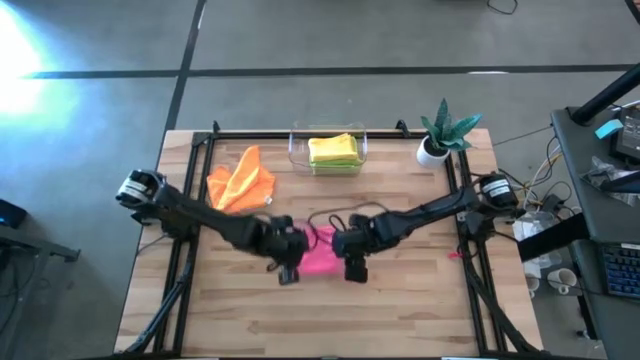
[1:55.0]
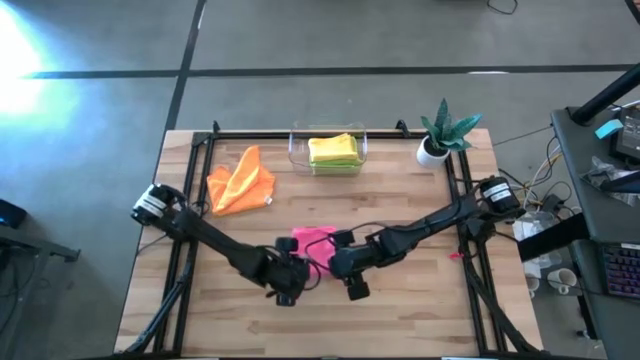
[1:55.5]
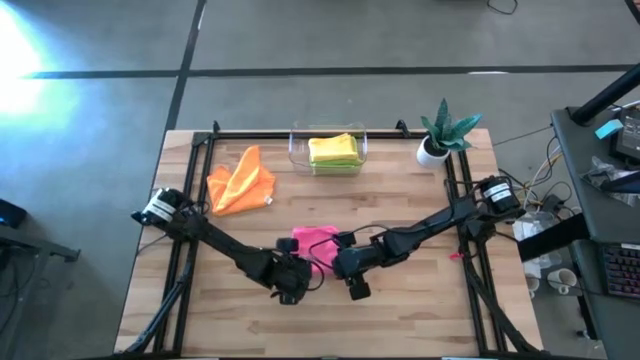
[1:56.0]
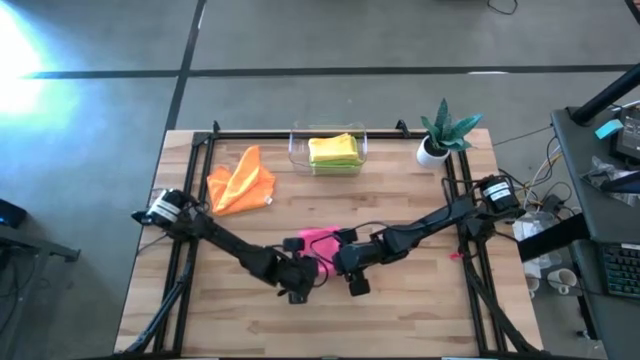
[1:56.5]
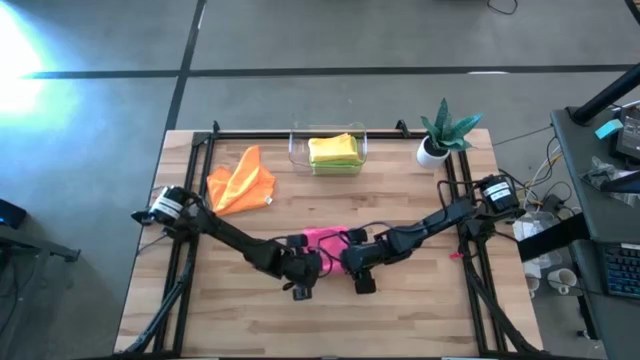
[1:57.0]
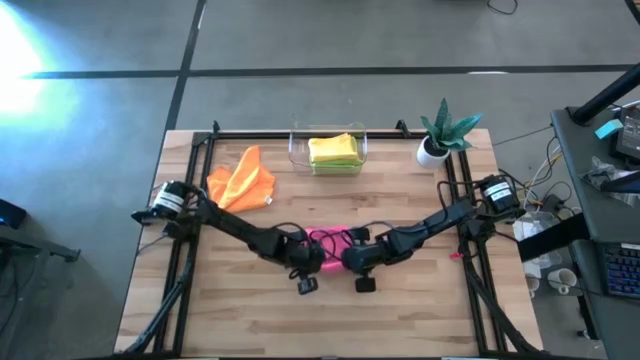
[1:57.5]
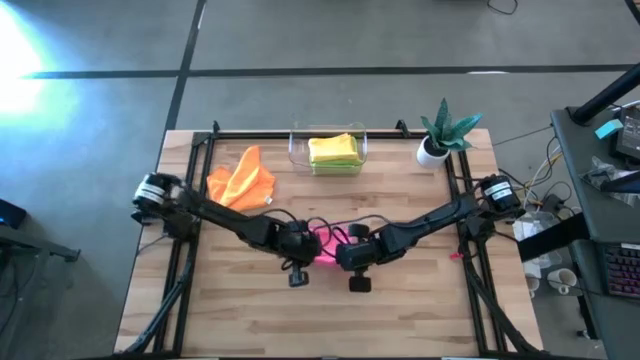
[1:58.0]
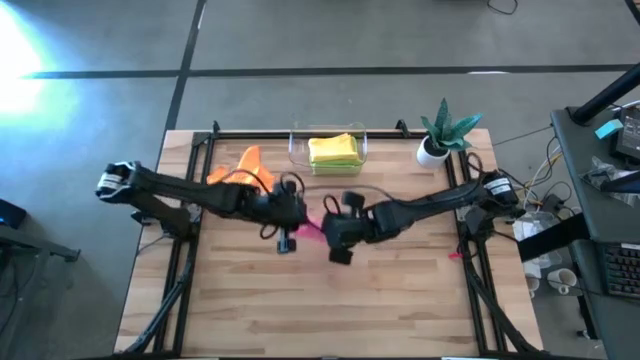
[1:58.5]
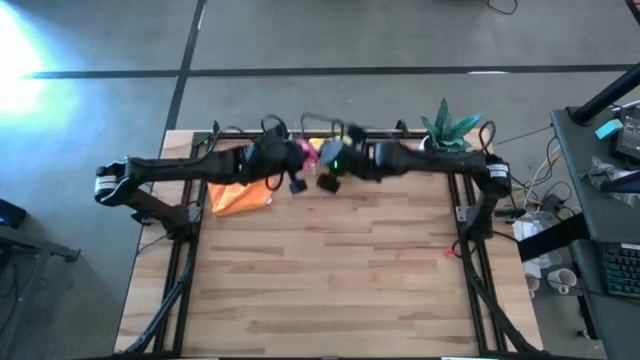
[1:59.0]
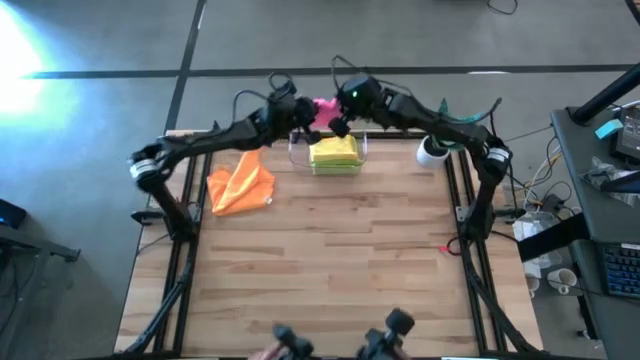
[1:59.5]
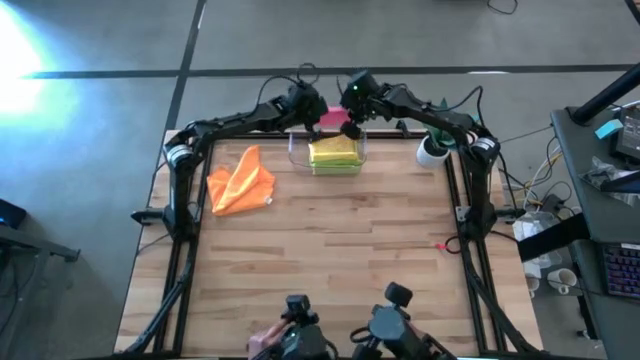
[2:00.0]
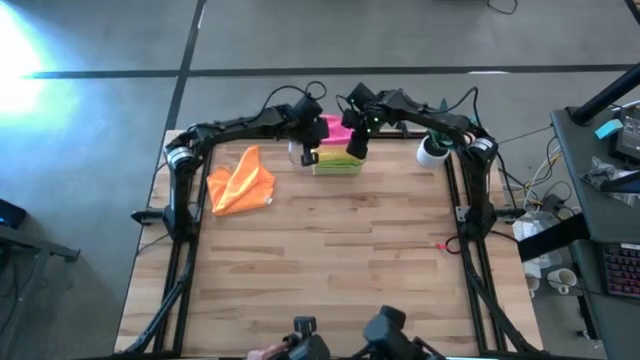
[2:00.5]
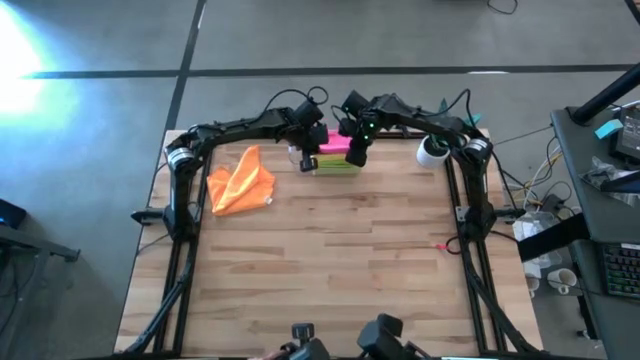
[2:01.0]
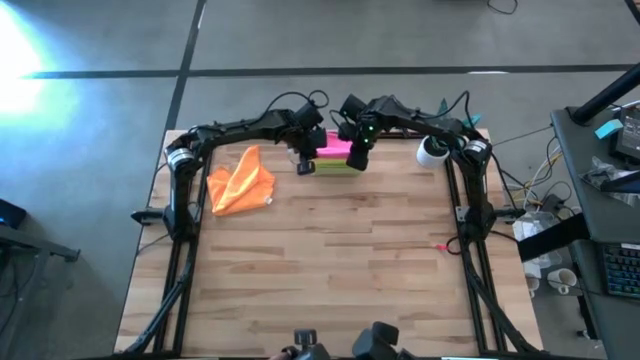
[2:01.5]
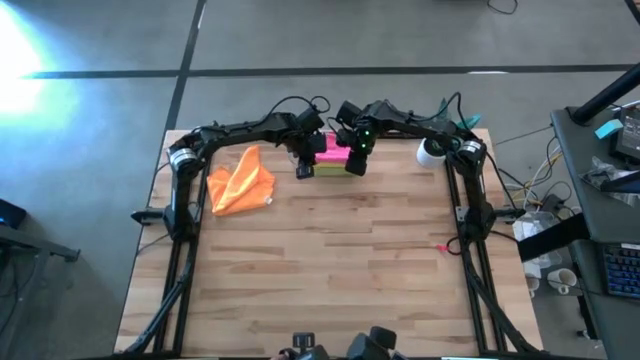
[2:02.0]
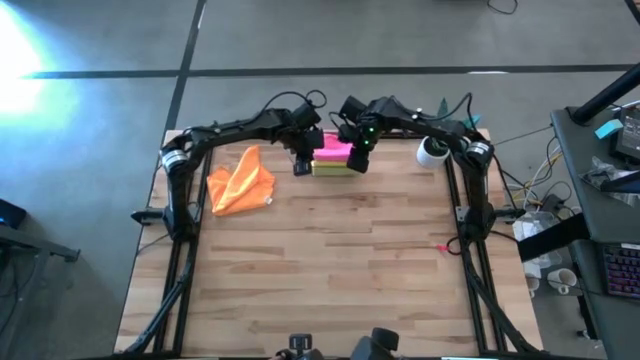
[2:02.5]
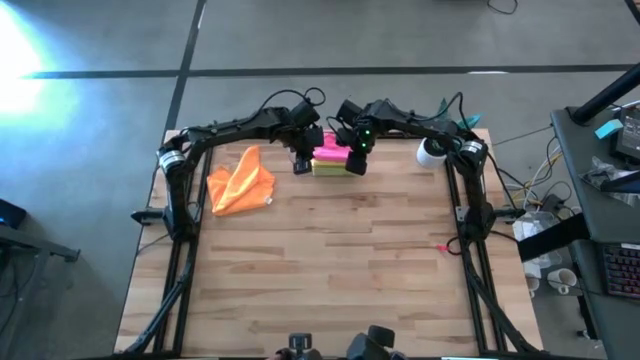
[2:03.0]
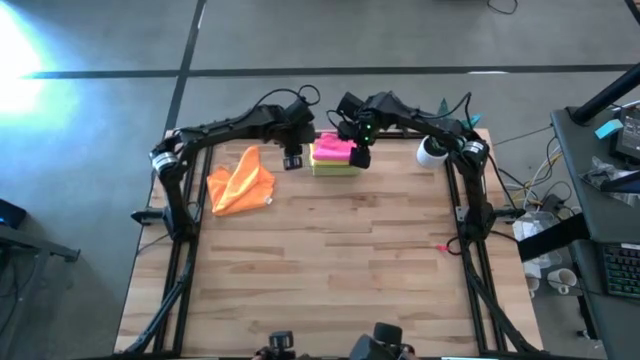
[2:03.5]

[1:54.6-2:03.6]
Task: Fold microfiber towels
Stack the pink microfiber towel on top of the yellow microfiber towel into the transparent bin

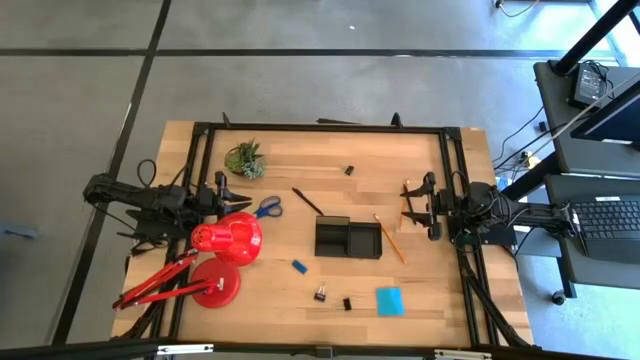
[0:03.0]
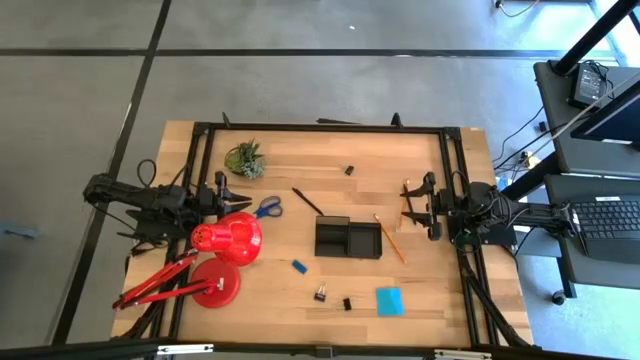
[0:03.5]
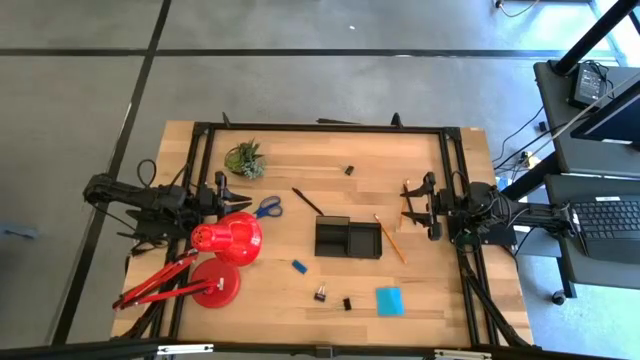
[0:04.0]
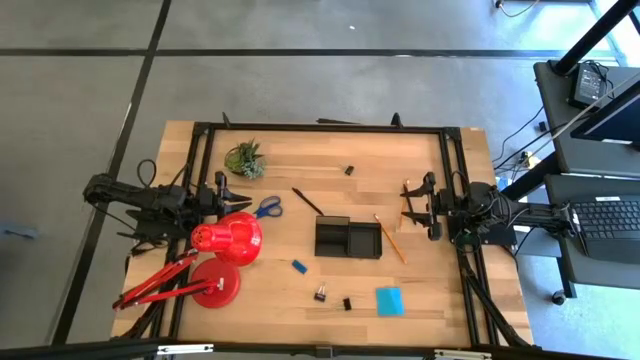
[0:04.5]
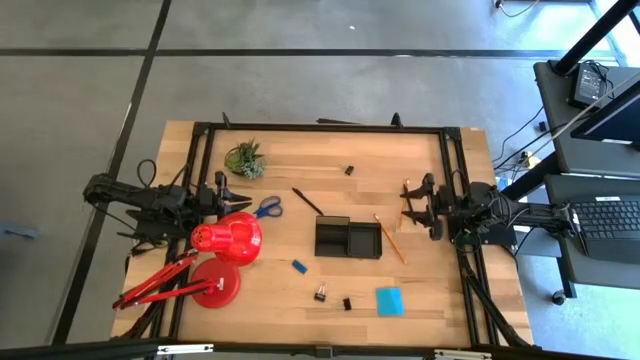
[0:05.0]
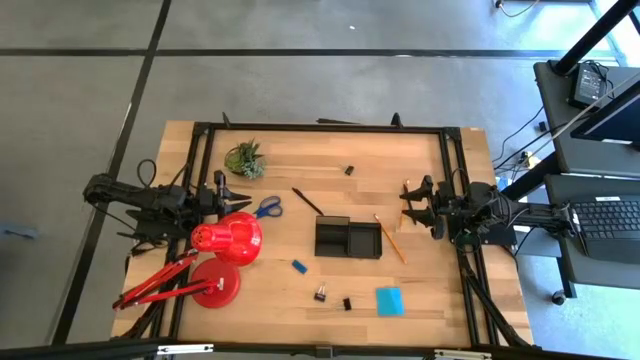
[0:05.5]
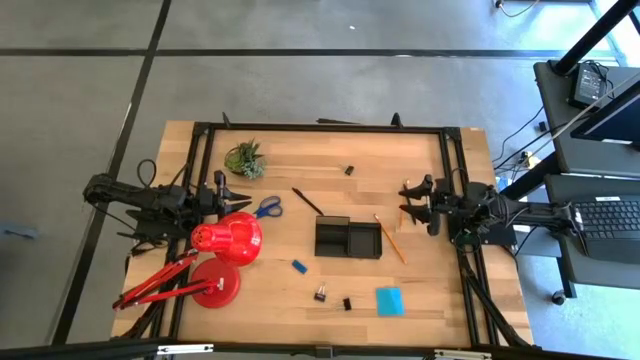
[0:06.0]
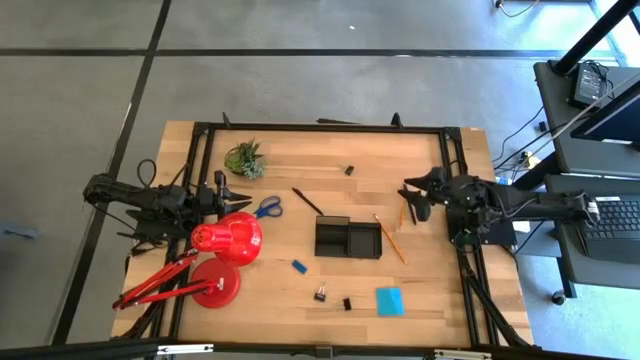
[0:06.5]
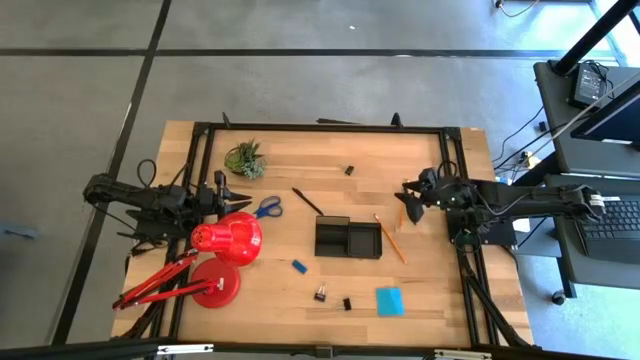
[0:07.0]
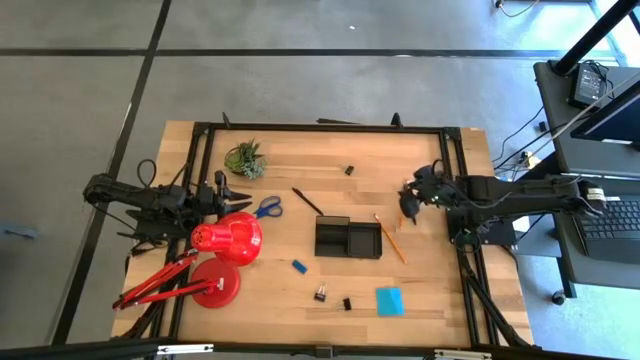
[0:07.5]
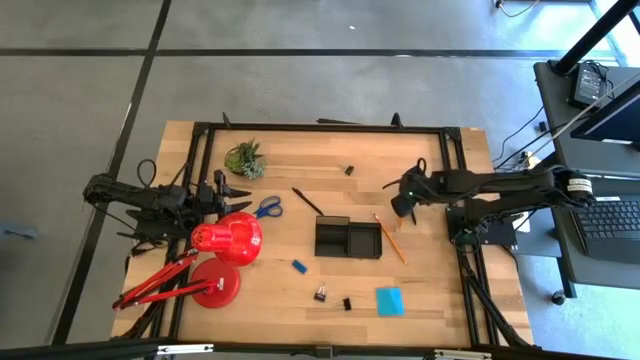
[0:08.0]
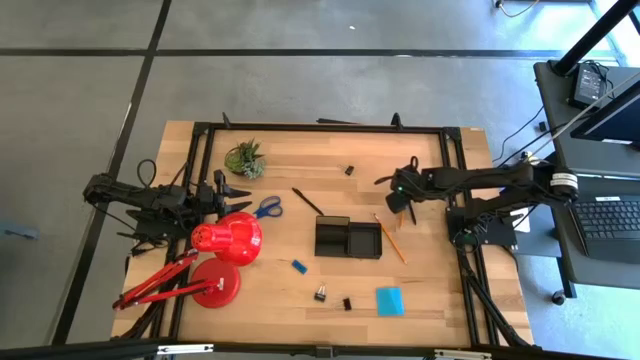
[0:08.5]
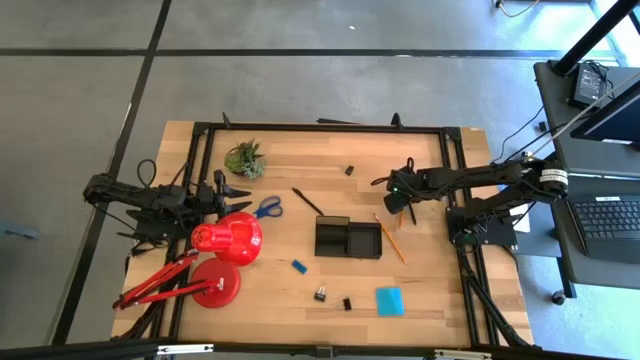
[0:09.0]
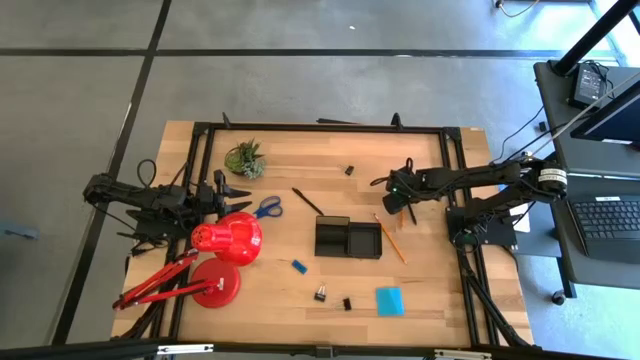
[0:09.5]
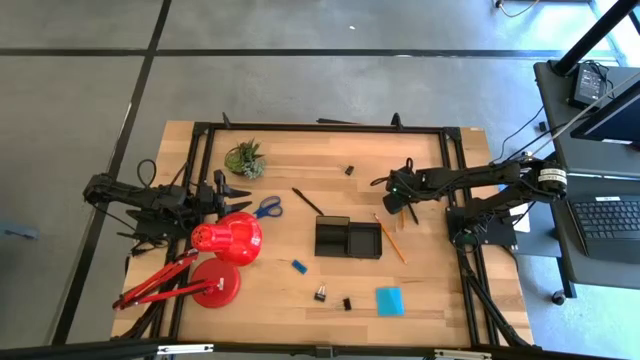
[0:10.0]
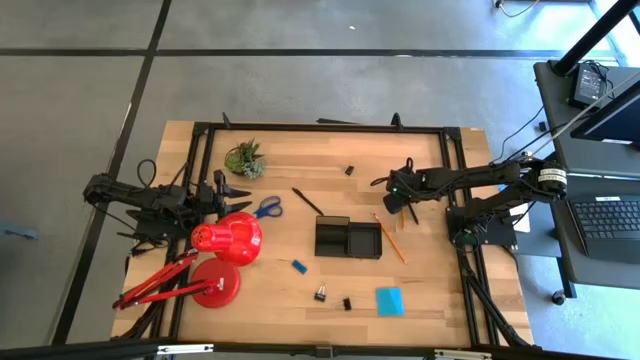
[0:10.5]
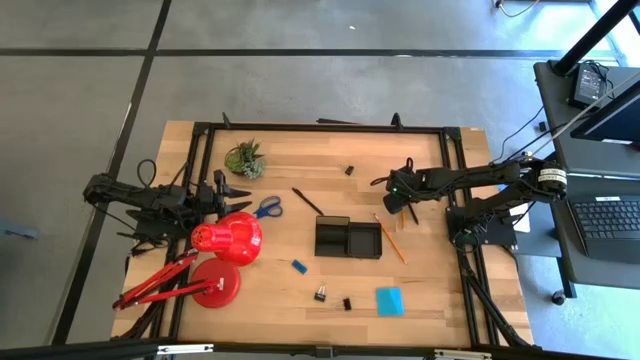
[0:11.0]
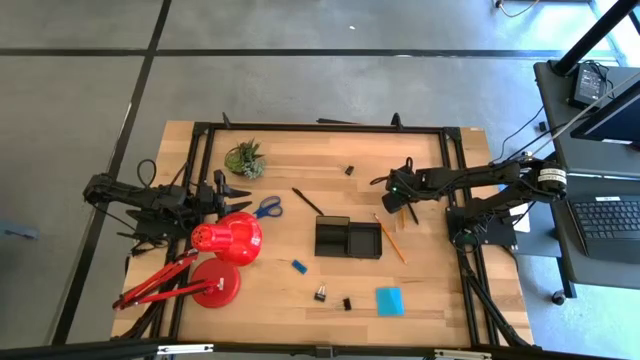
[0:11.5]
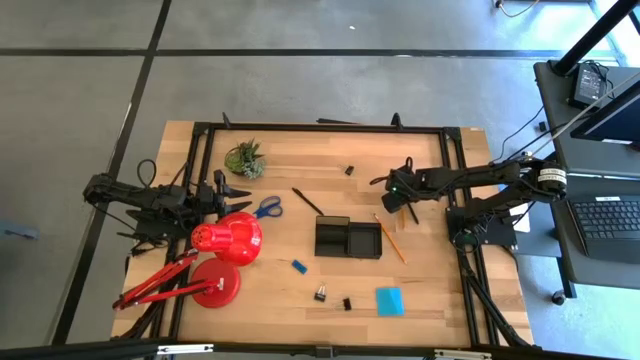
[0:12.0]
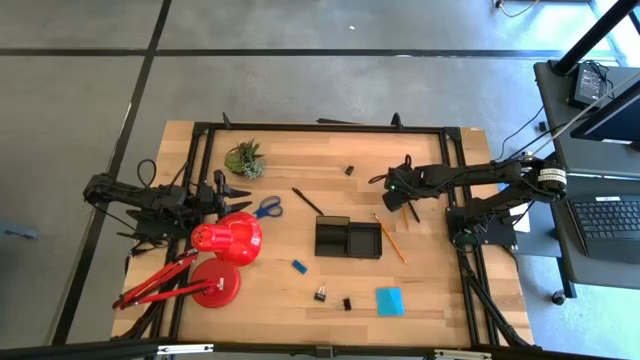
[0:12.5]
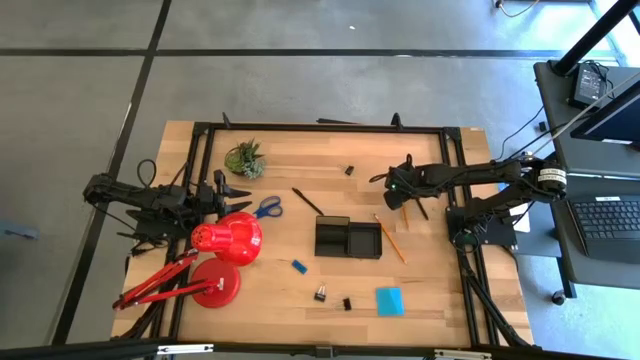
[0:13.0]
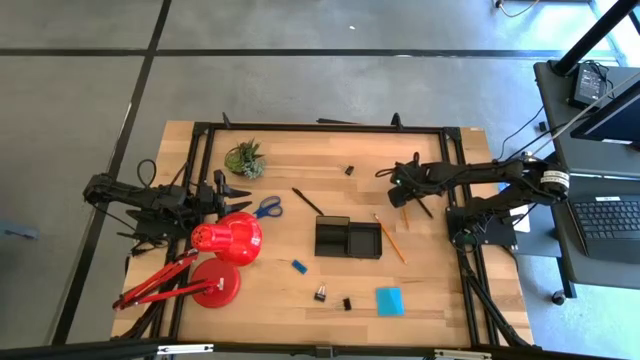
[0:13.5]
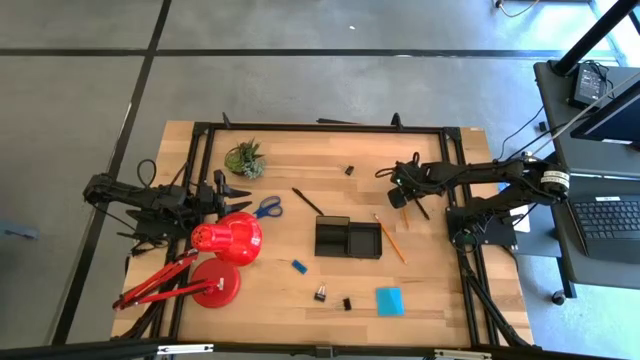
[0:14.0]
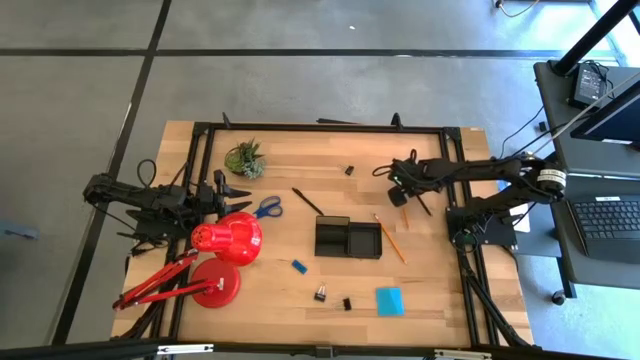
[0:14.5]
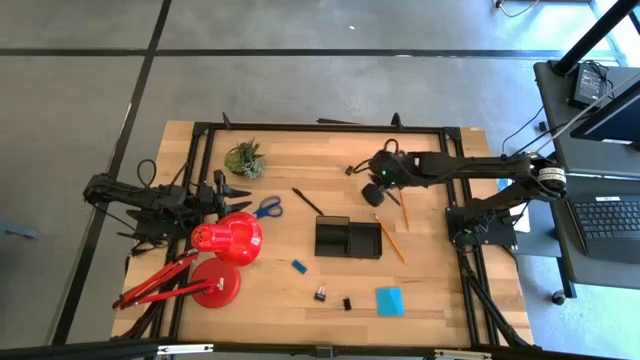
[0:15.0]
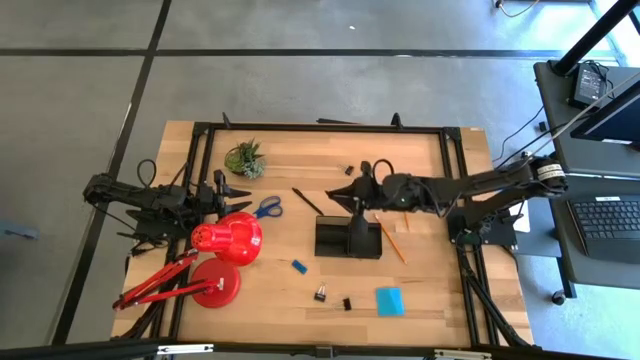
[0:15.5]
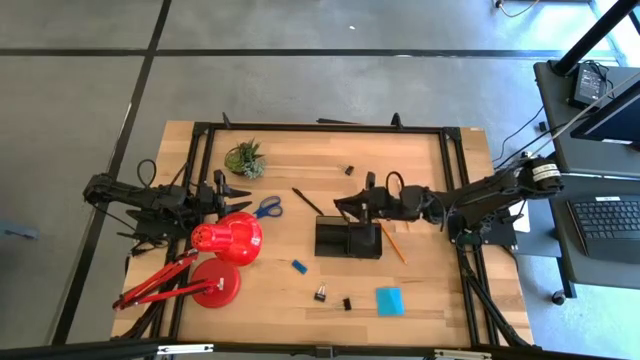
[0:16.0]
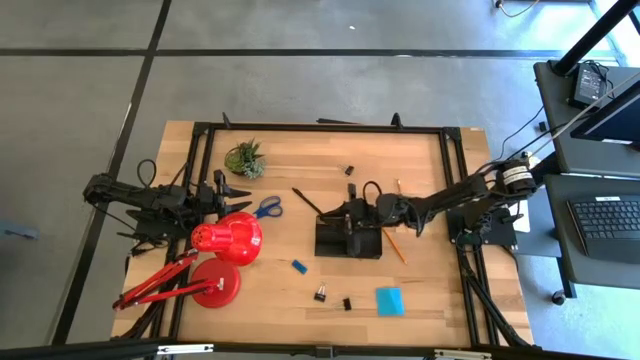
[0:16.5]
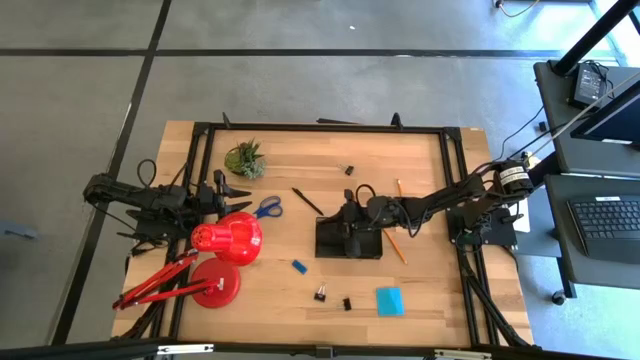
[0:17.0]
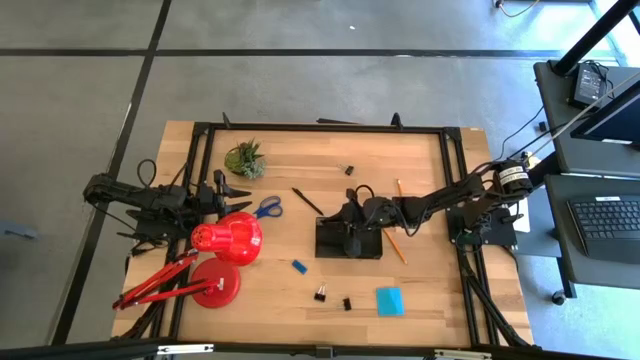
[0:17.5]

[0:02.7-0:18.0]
Task: Pick and place office supplies into organizer
Put the right black pen into the black desk organizer
